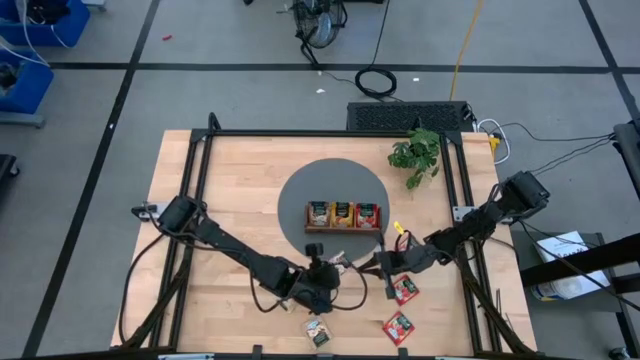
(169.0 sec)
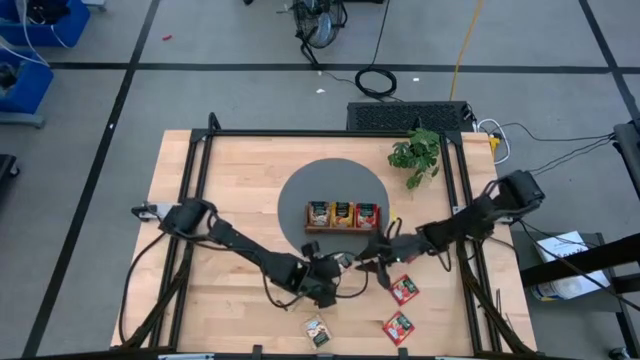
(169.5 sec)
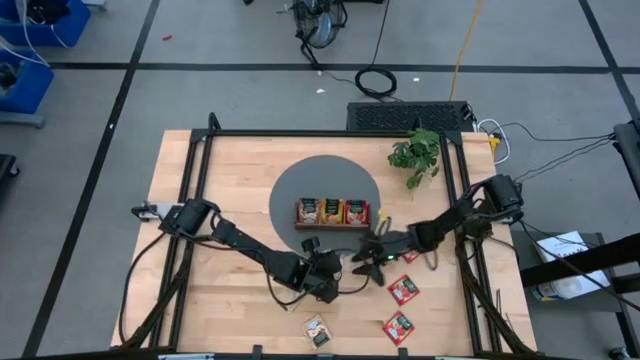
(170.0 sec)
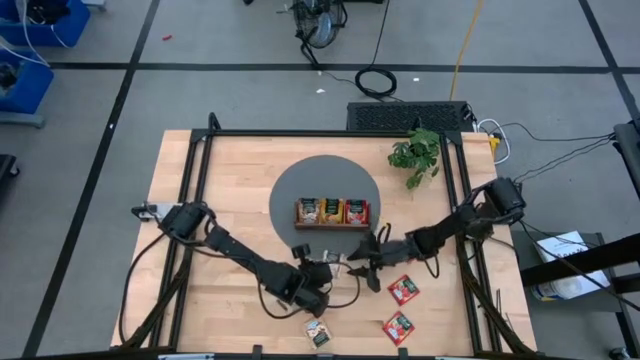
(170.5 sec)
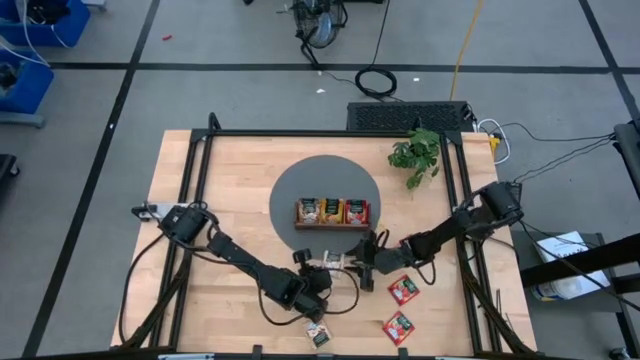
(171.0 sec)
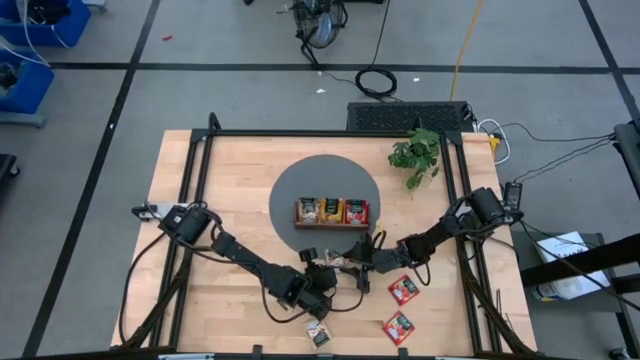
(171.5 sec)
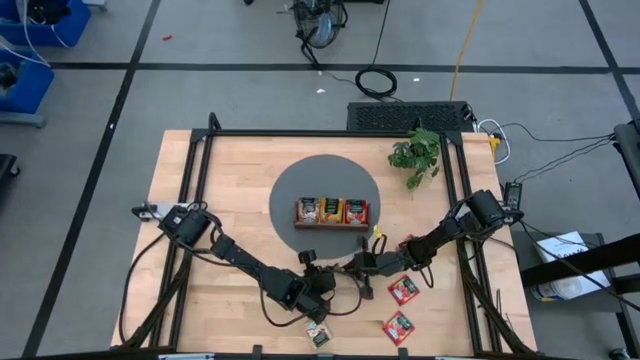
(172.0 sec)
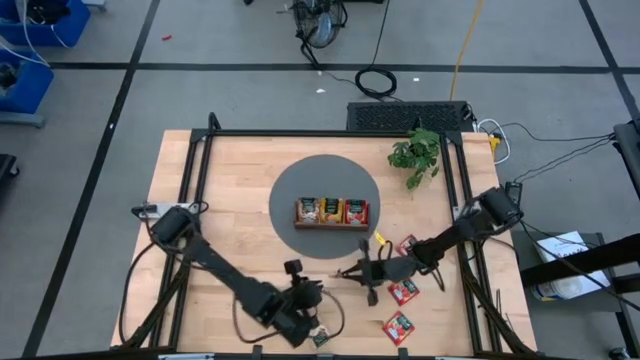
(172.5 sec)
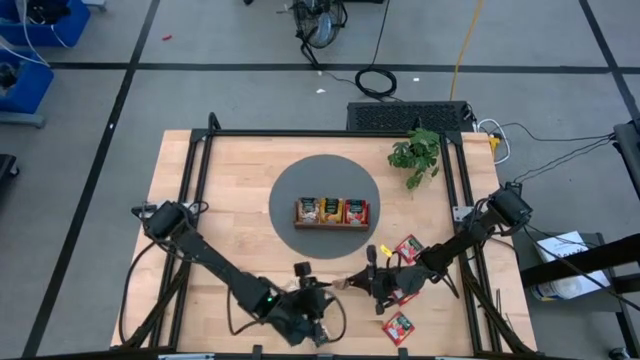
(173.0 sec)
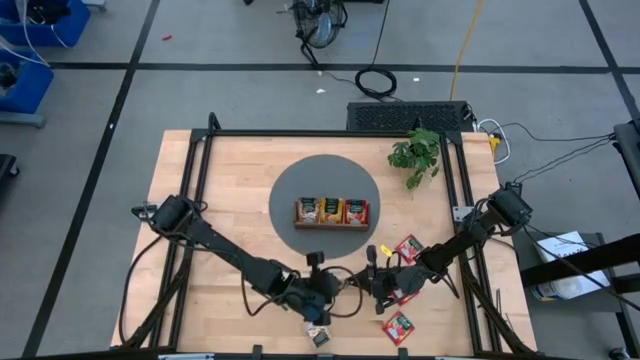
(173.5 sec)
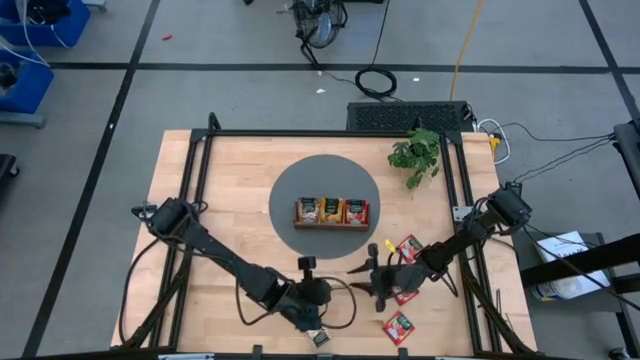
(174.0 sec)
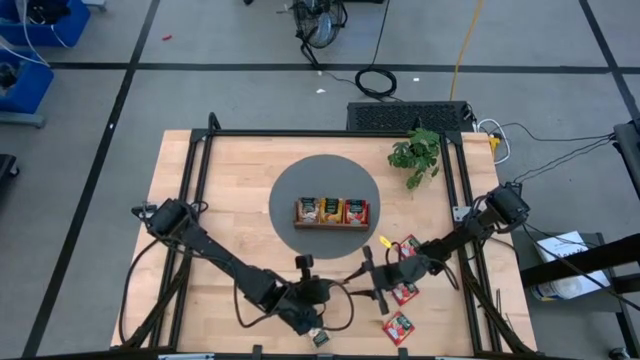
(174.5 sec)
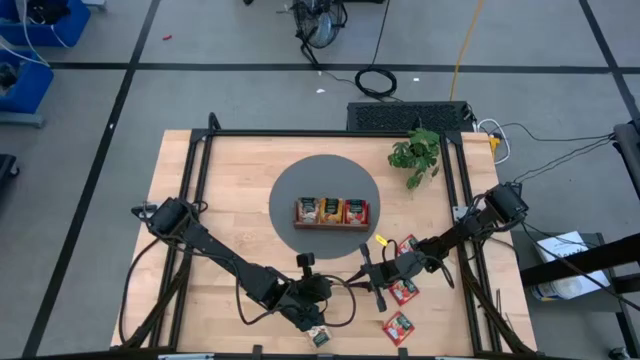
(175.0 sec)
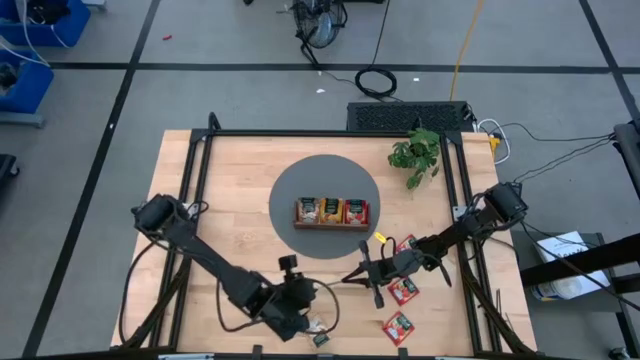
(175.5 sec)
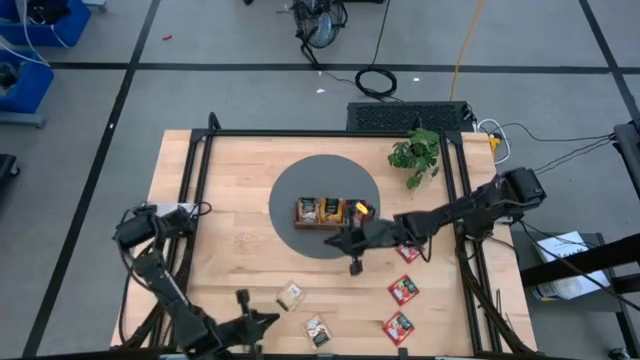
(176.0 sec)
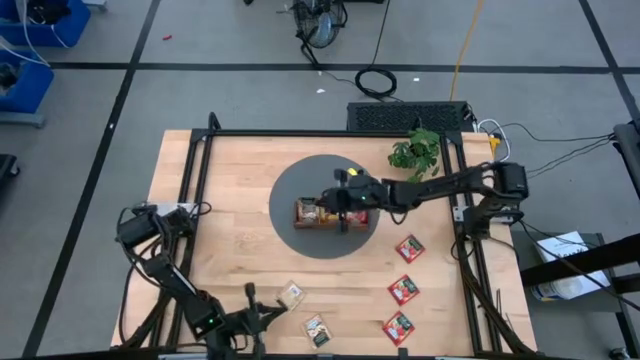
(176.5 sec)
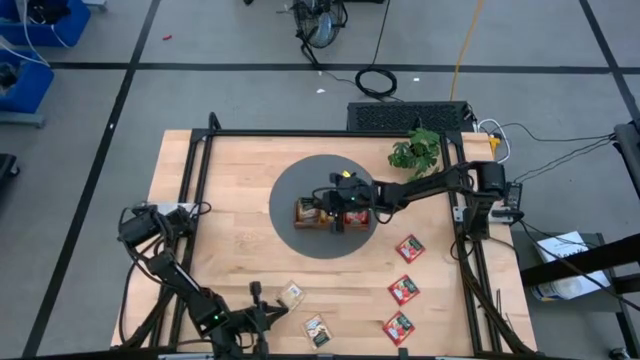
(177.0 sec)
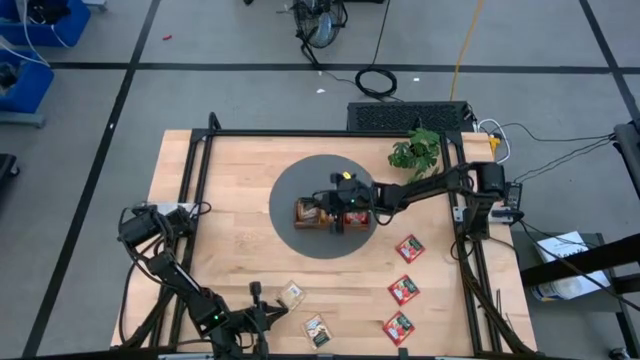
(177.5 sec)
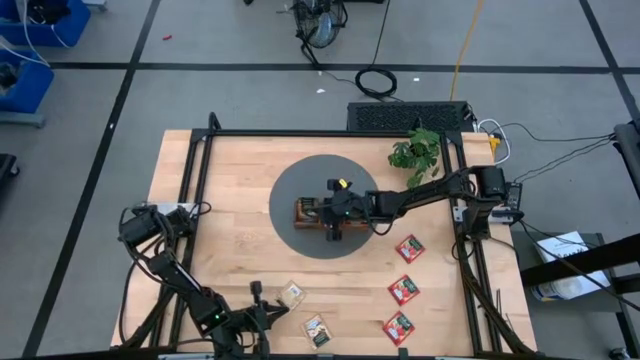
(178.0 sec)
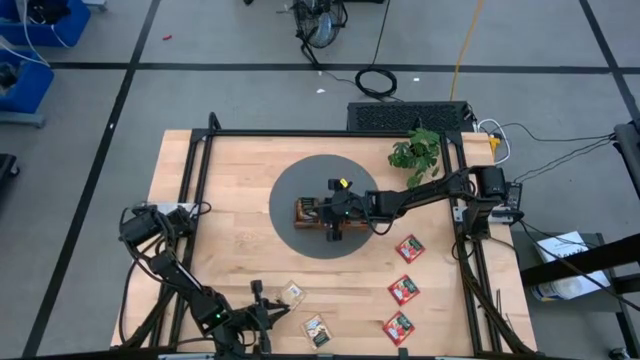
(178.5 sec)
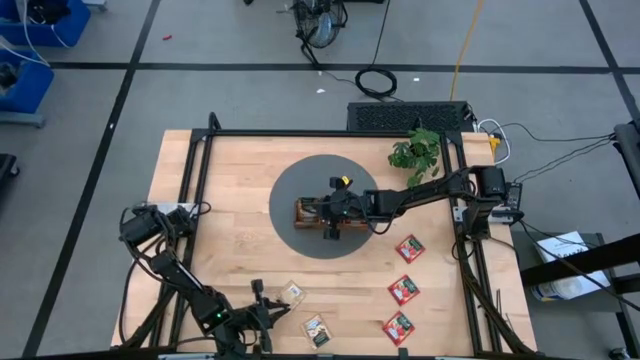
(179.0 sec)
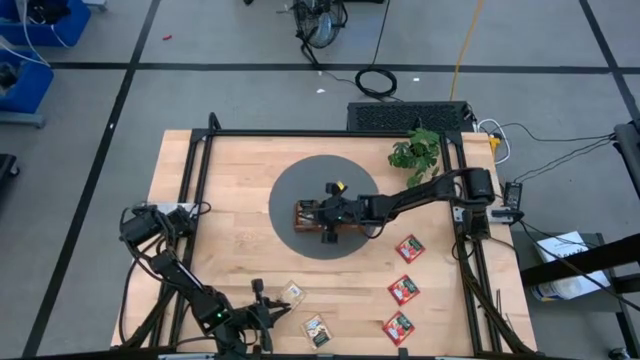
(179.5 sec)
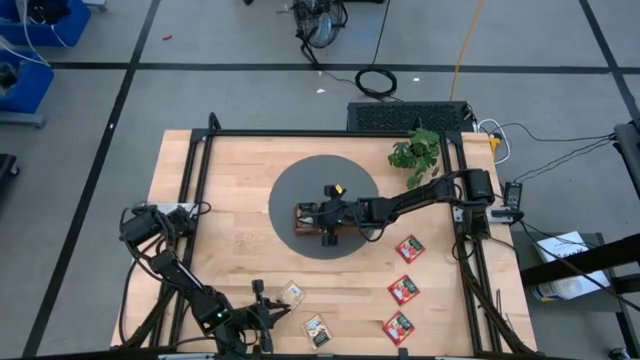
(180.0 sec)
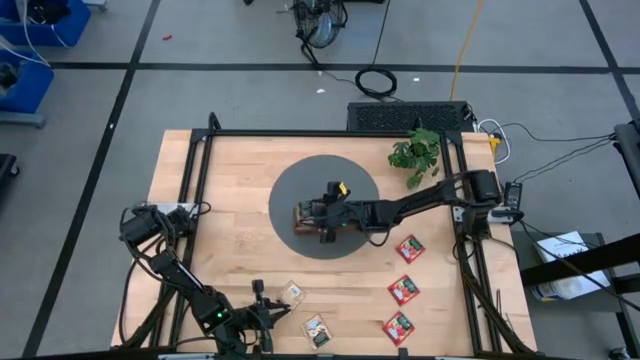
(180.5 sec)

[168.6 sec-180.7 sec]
Task: Pick & Place Tea
Put the brown tea bag into the left section of the wooden organizer

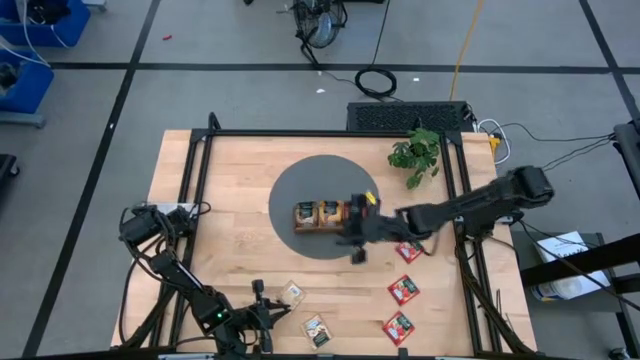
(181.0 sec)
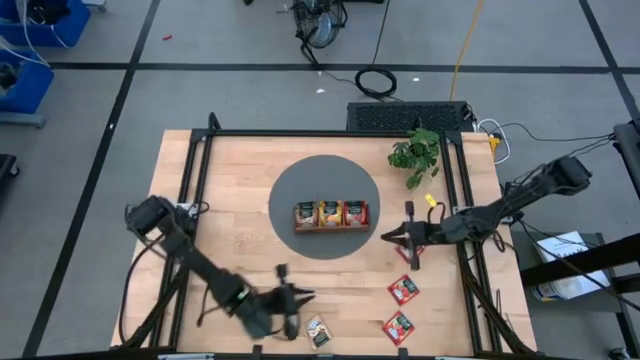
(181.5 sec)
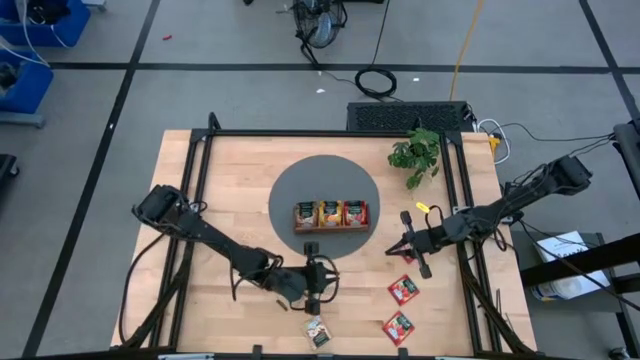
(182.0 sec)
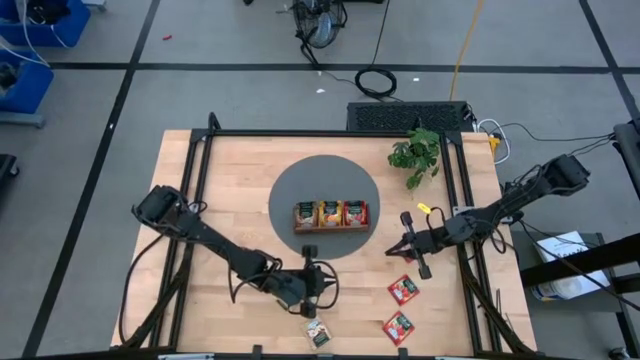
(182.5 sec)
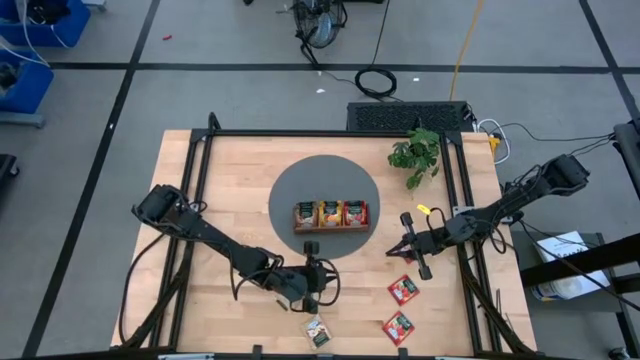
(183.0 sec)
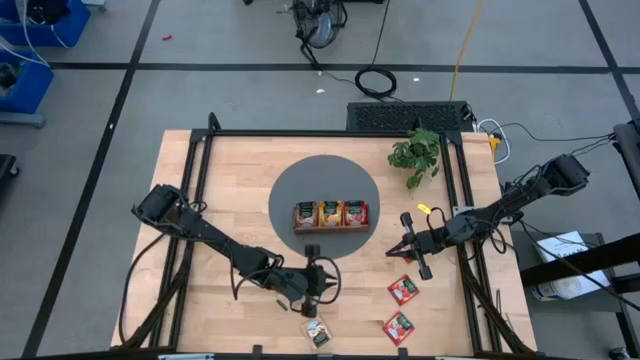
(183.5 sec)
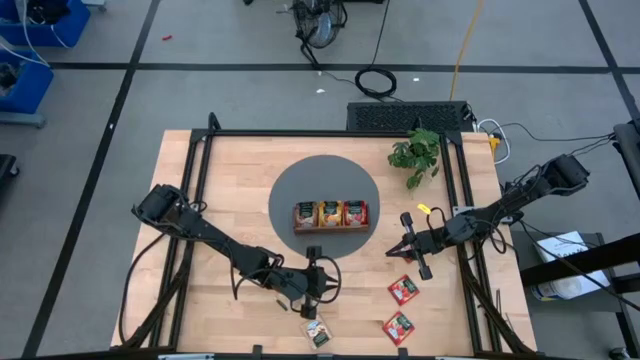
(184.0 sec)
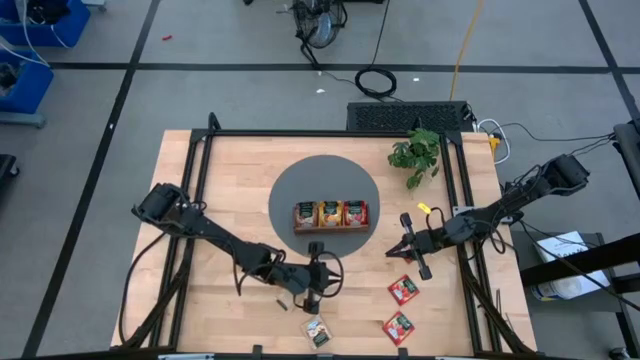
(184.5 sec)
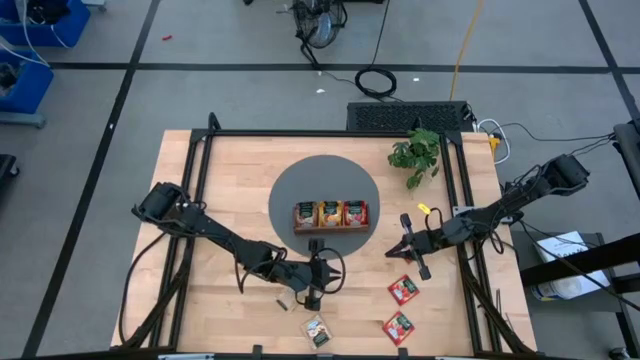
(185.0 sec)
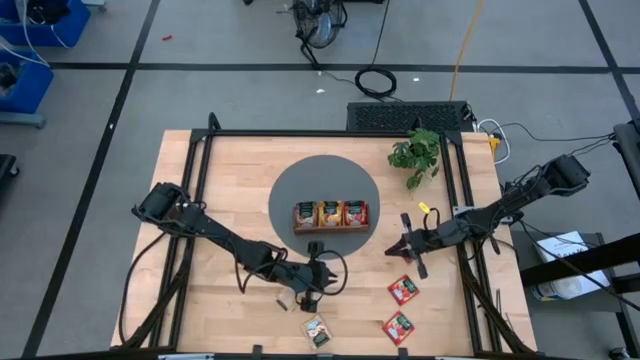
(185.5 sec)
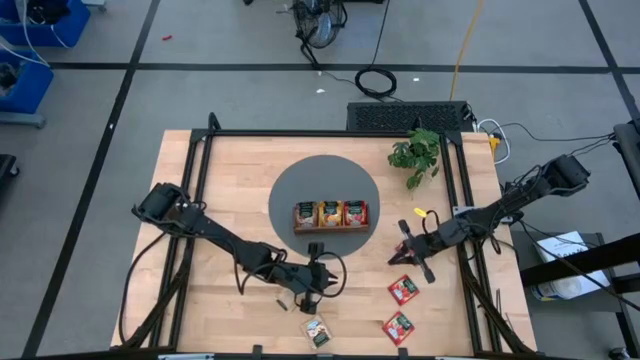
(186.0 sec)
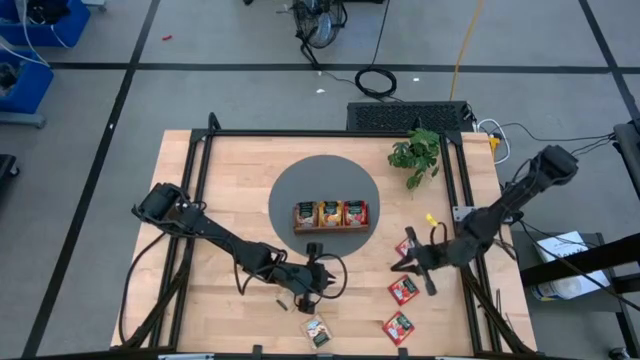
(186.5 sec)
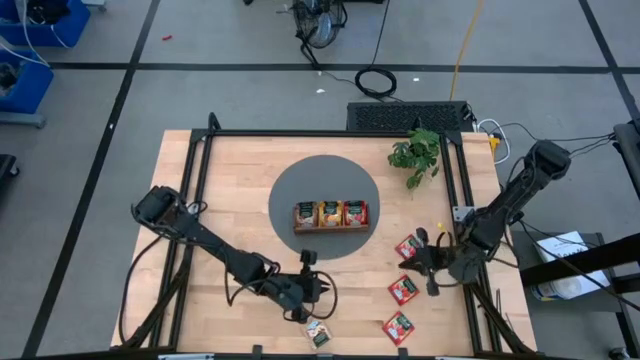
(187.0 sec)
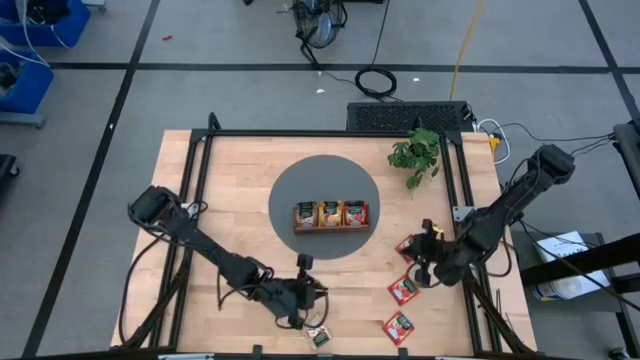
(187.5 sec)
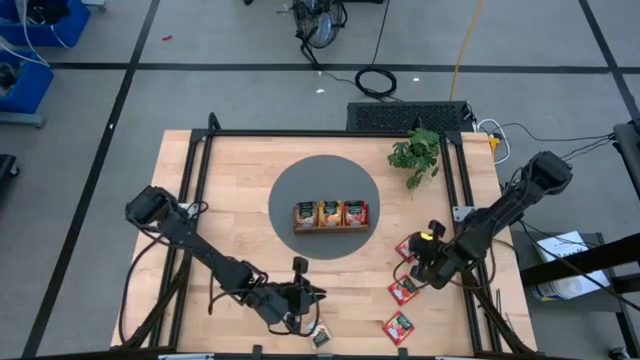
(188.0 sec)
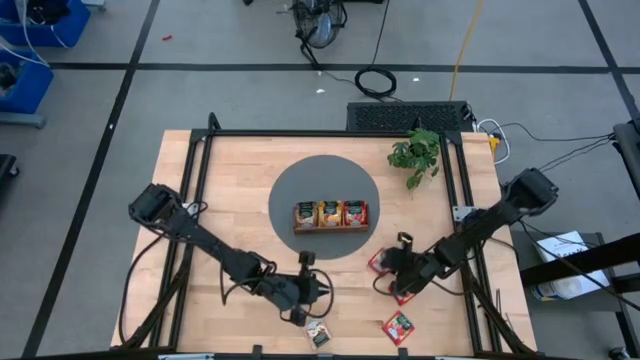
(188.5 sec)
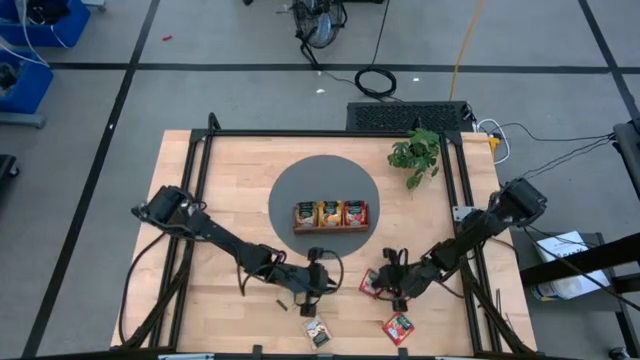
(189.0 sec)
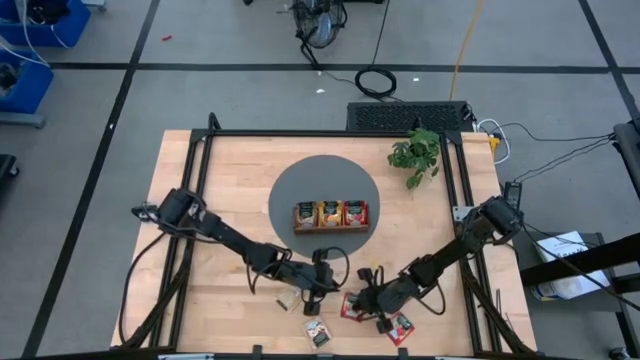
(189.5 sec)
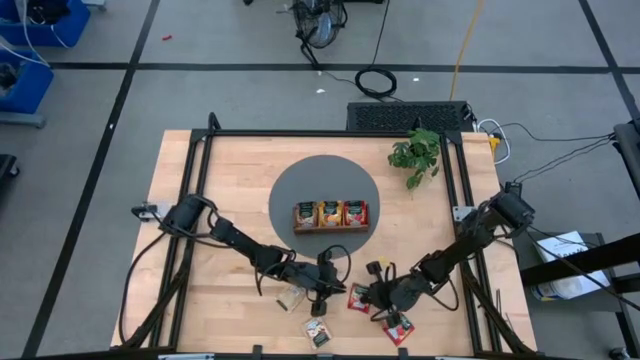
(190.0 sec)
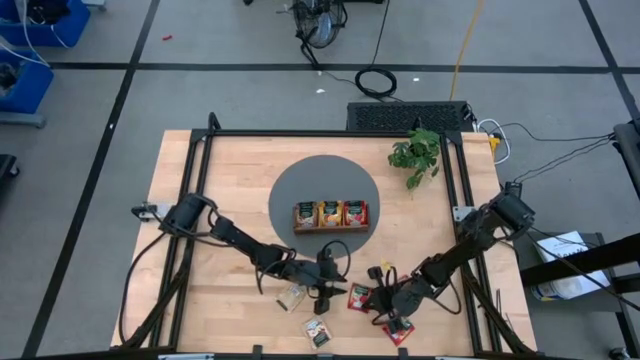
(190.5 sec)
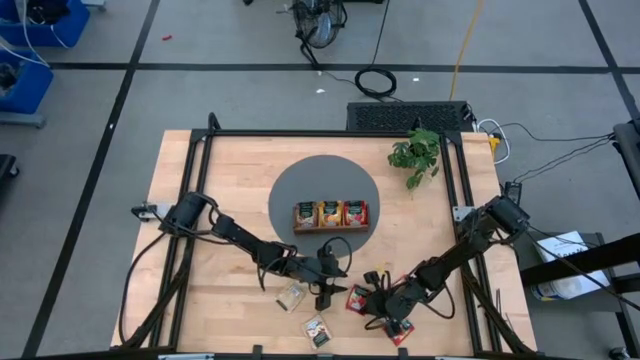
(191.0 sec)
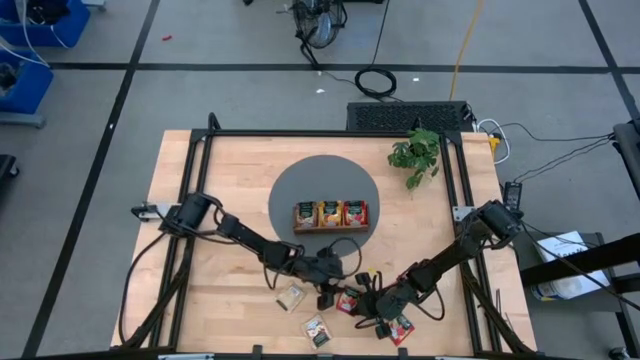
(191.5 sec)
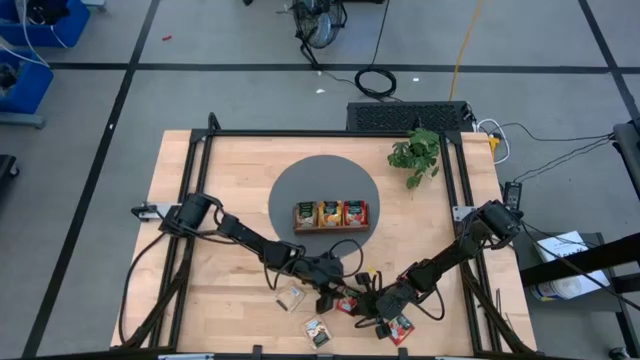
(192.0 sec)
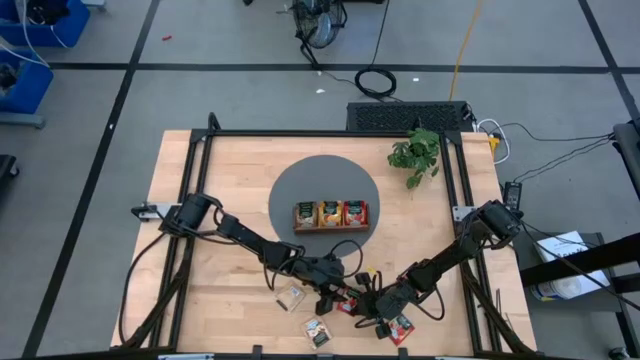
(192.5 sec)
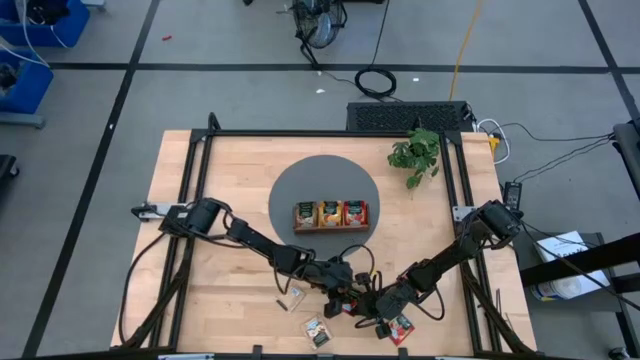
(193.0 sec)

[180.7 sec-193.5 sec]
Put the red tea bag into the right section of the wooden organizer
